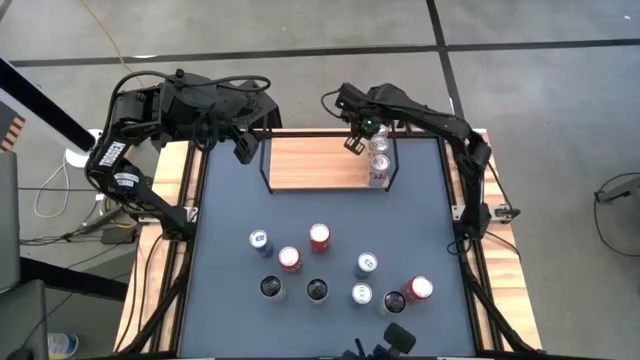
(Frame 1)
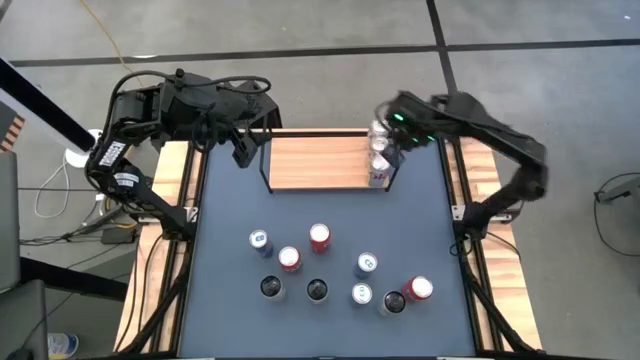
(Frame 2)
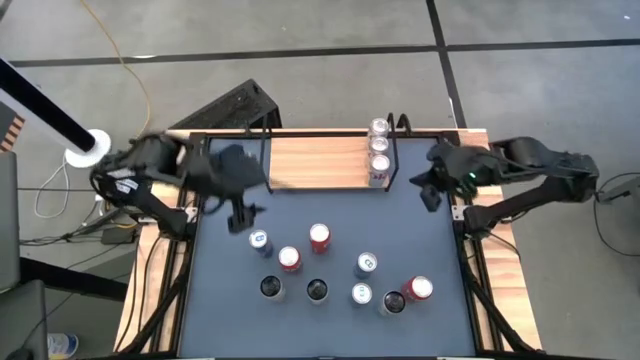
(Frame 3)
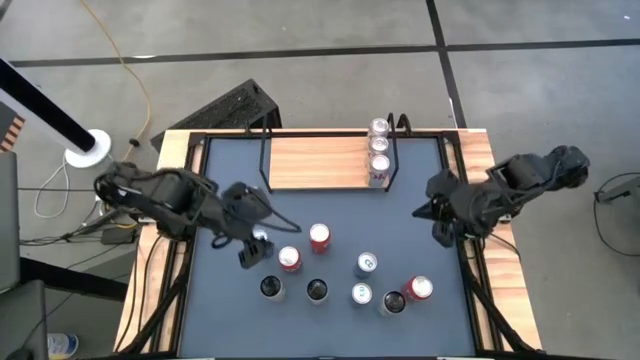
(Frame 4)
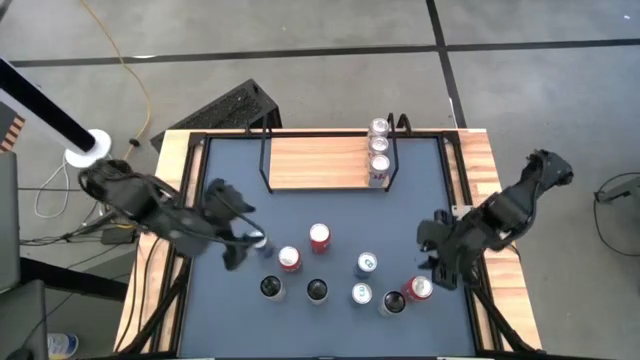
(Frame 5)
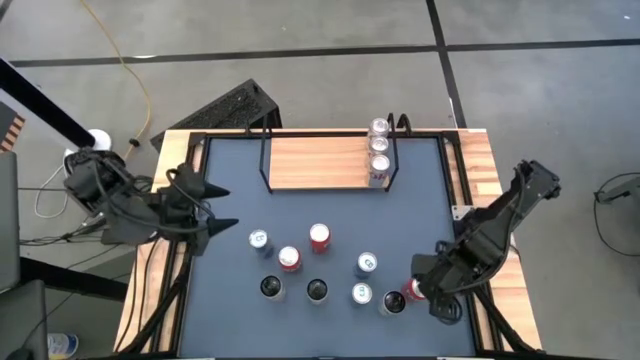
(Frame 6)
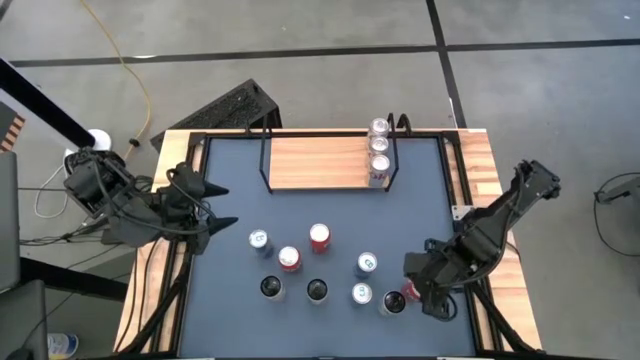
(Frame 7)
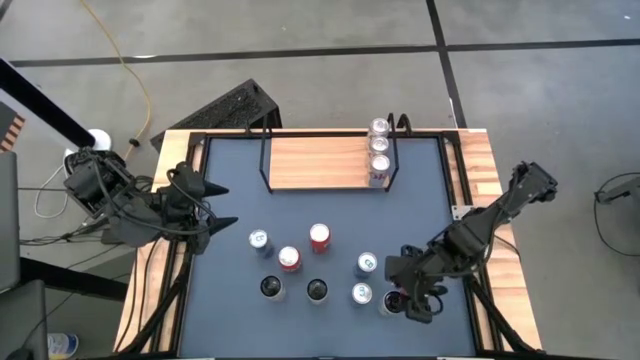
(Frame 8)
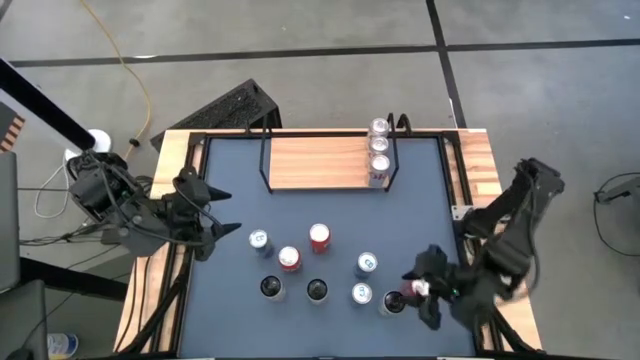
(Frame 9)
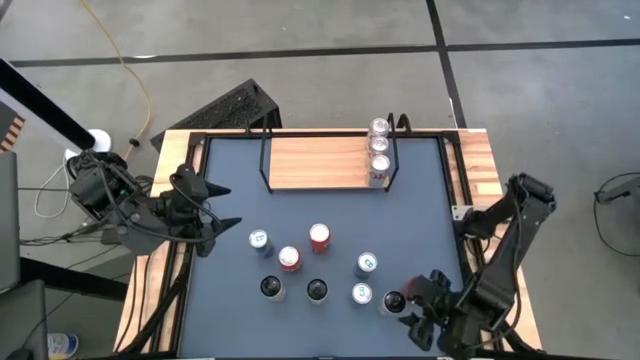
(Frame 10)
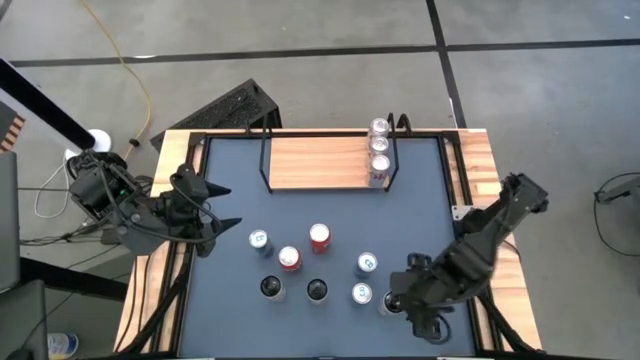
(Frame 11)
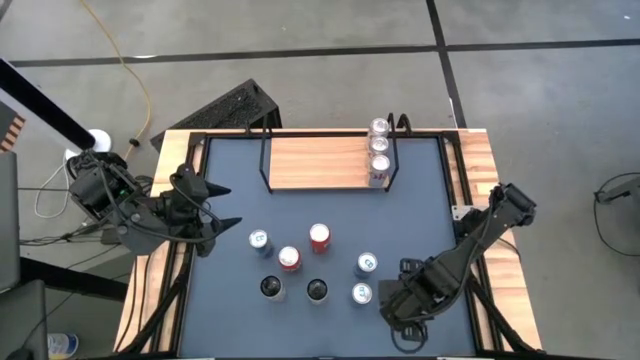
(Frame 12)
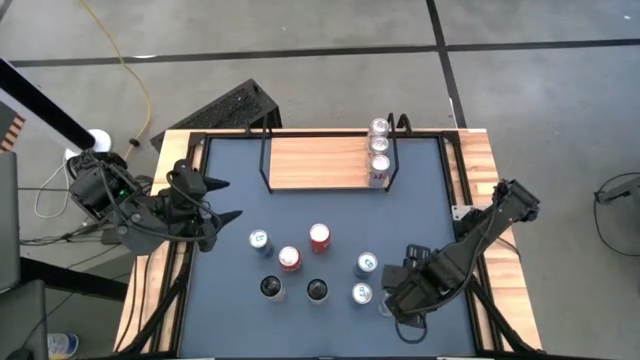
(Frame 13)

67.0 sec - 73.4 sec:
Task: Place canned beverage on shelf
Put the bottom right white soda can on the shelf

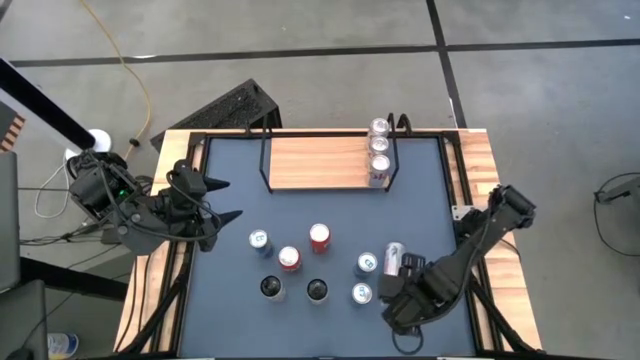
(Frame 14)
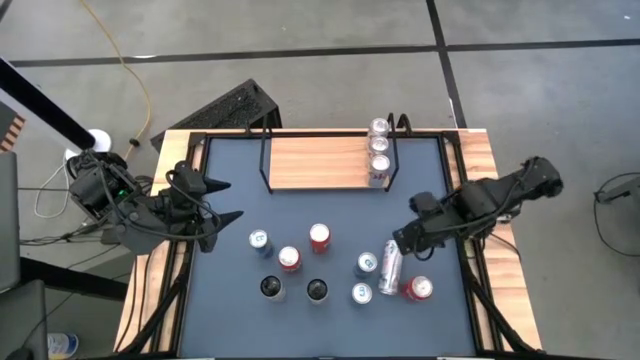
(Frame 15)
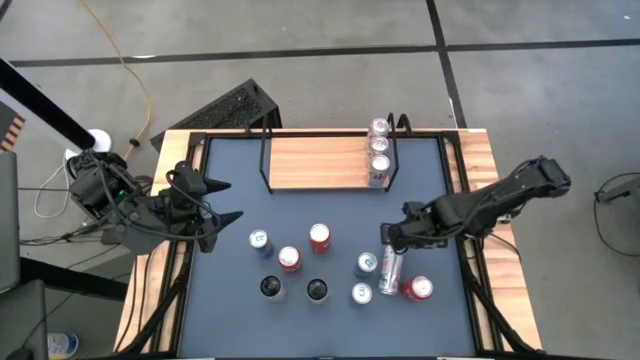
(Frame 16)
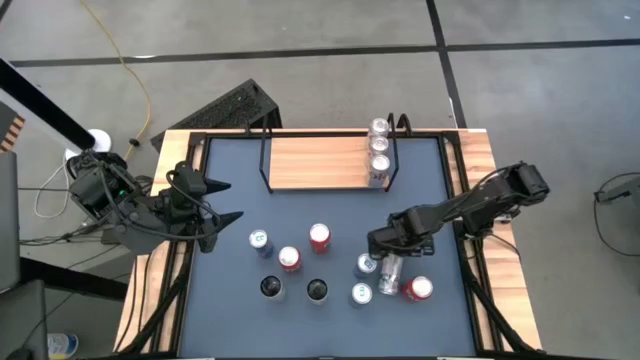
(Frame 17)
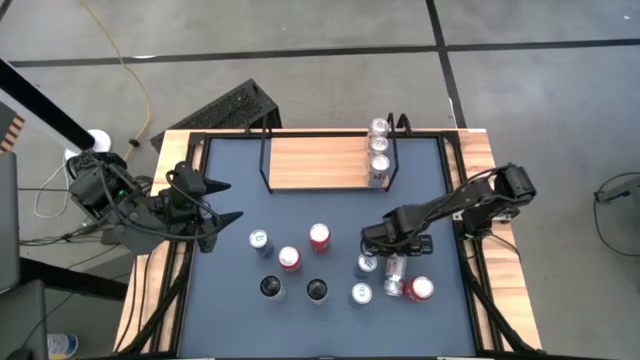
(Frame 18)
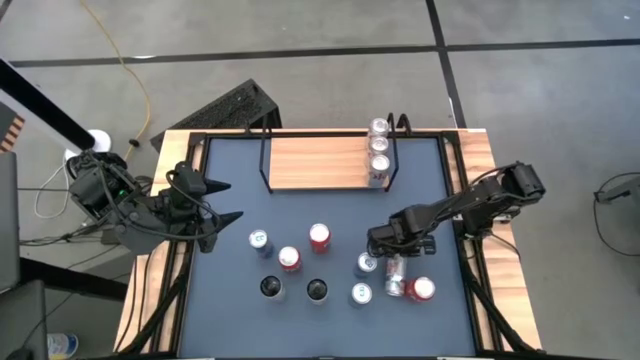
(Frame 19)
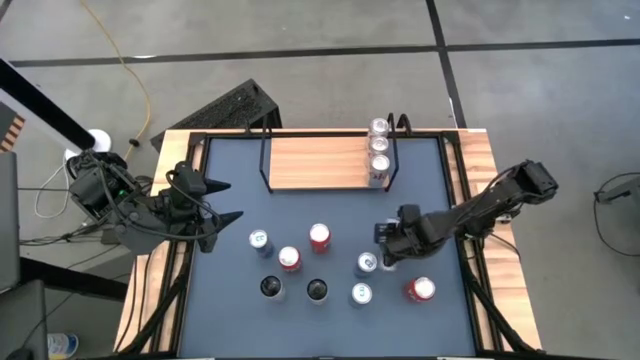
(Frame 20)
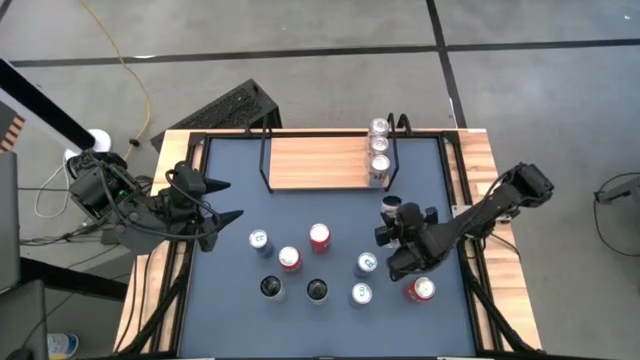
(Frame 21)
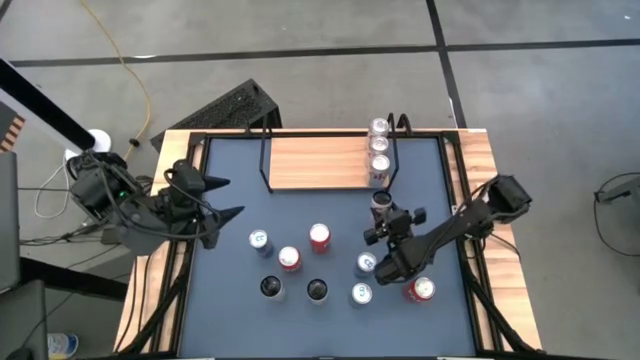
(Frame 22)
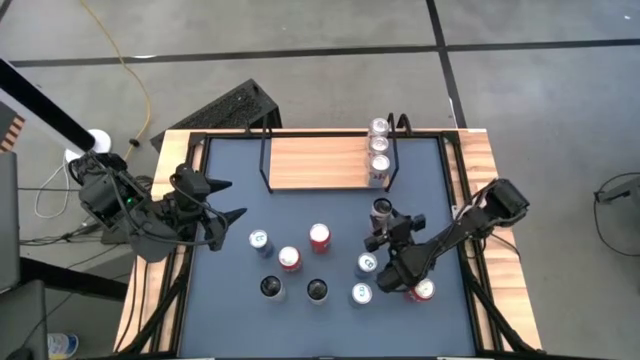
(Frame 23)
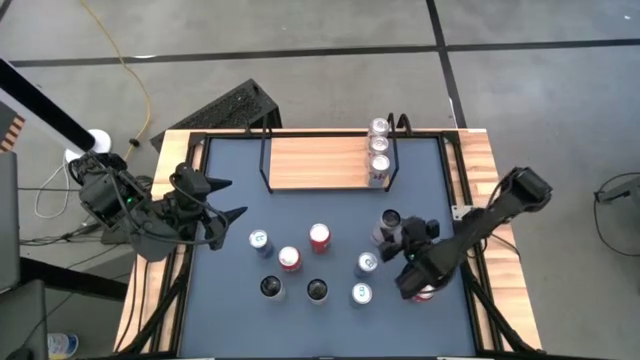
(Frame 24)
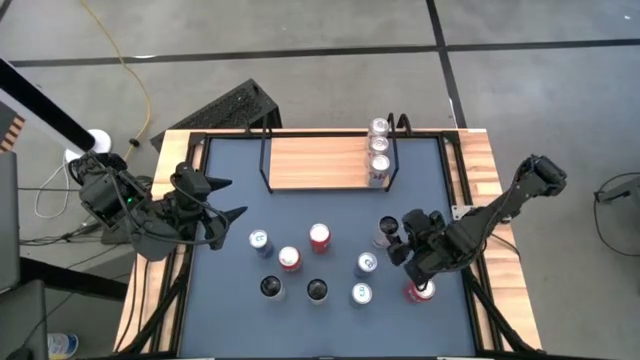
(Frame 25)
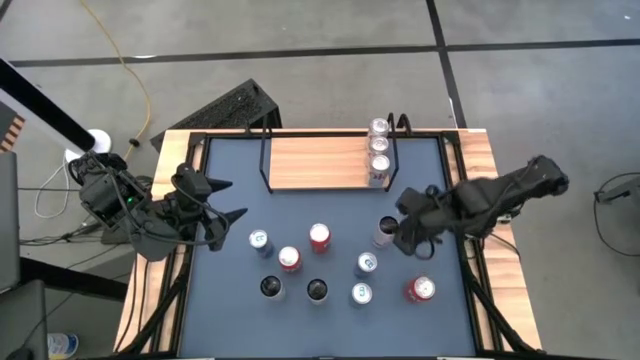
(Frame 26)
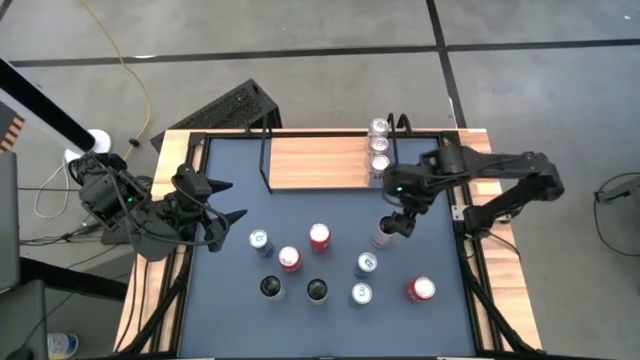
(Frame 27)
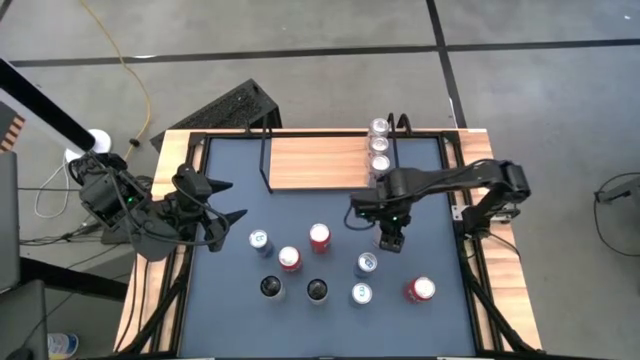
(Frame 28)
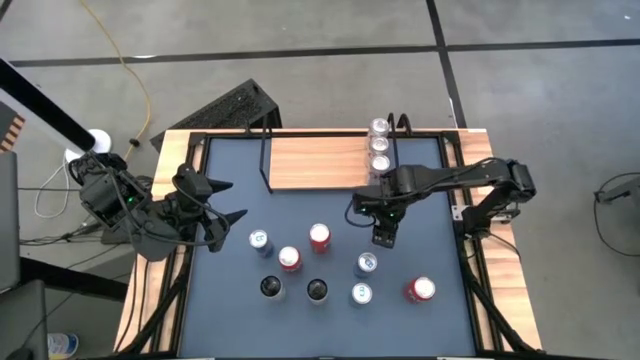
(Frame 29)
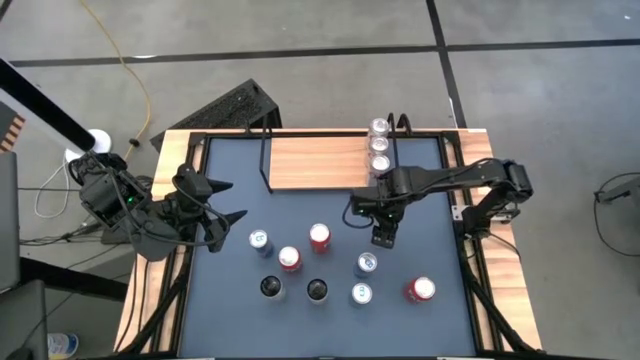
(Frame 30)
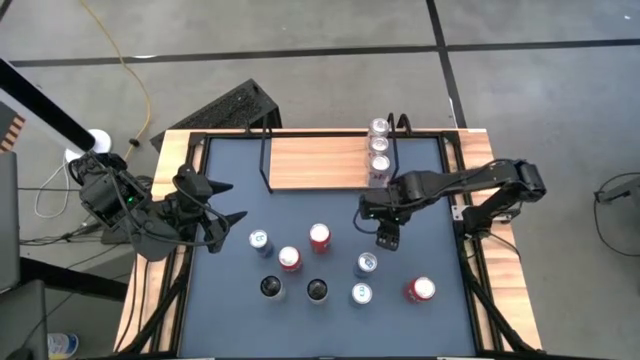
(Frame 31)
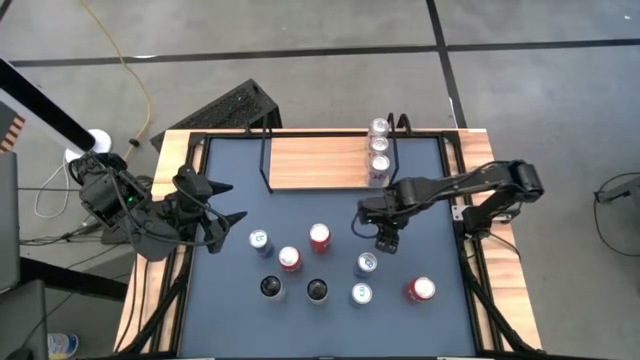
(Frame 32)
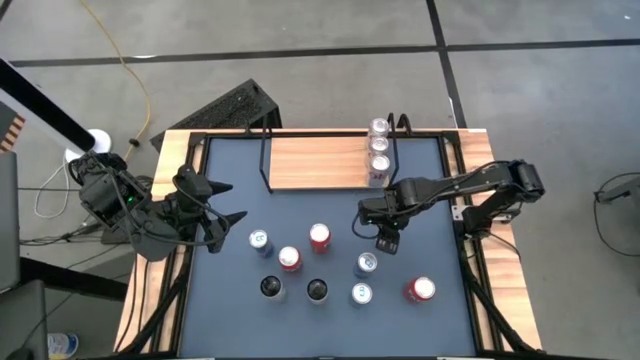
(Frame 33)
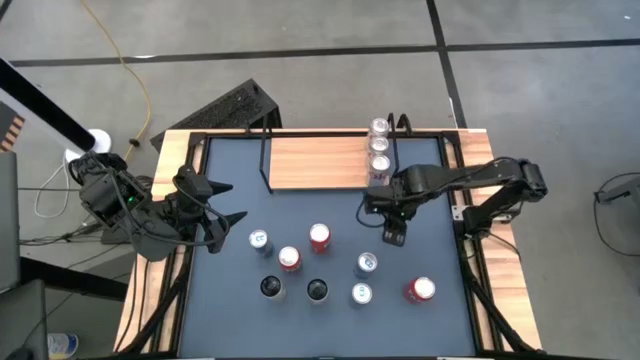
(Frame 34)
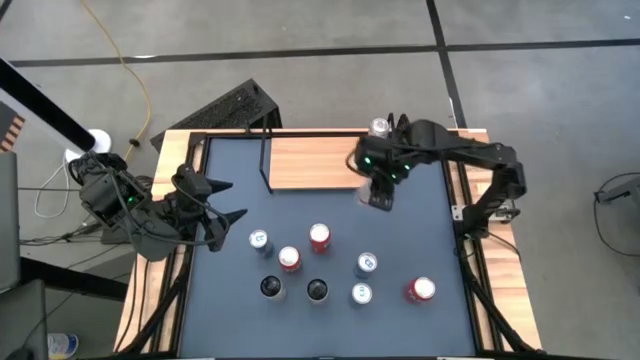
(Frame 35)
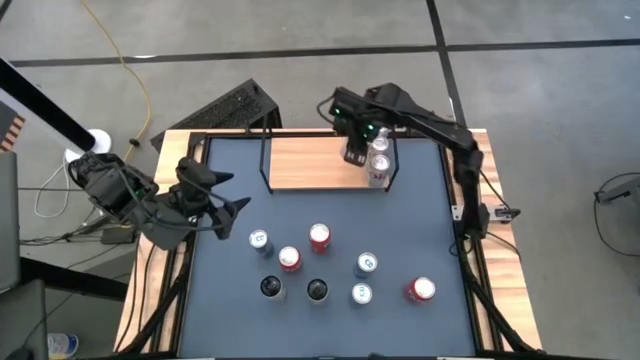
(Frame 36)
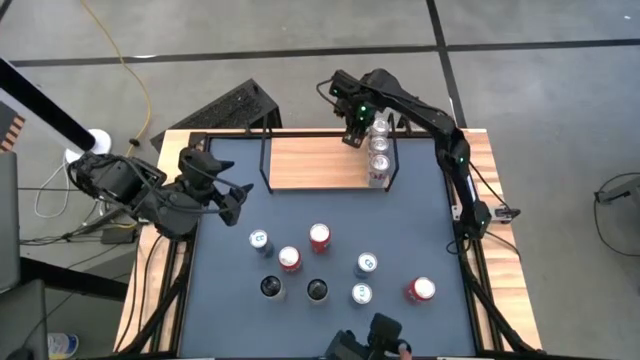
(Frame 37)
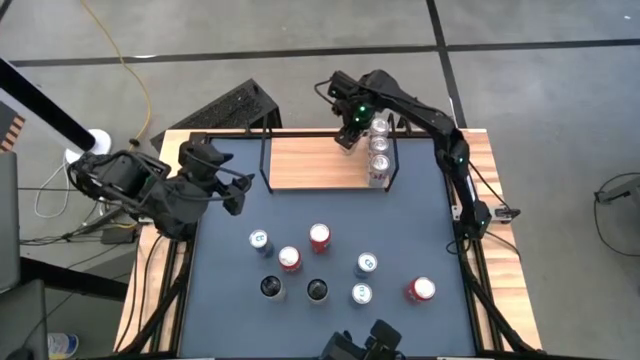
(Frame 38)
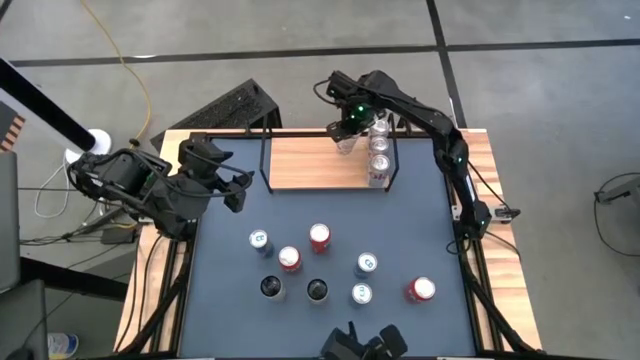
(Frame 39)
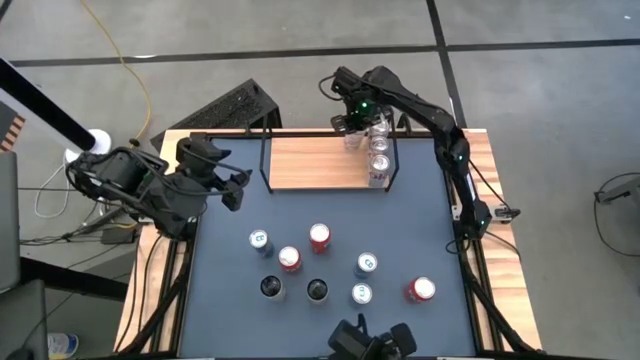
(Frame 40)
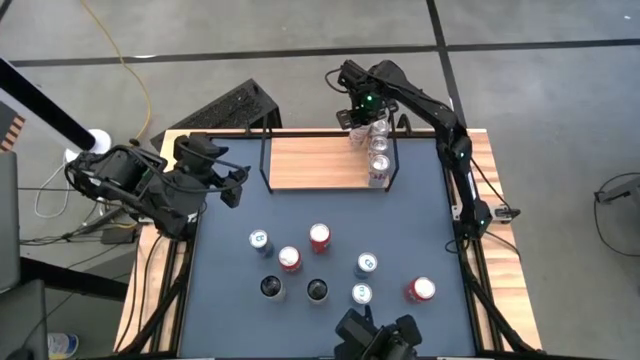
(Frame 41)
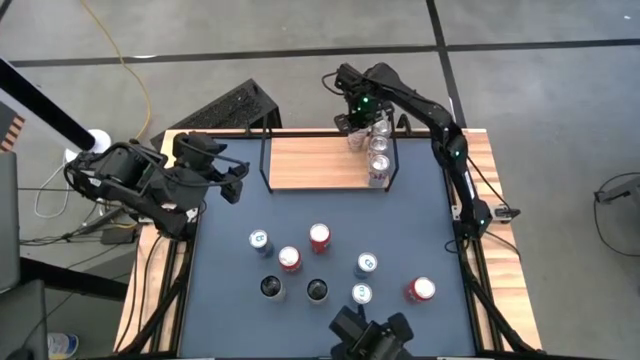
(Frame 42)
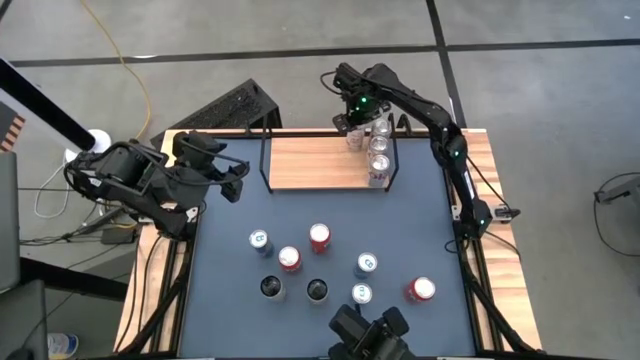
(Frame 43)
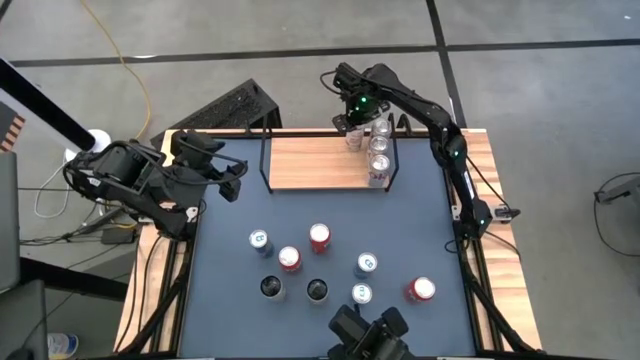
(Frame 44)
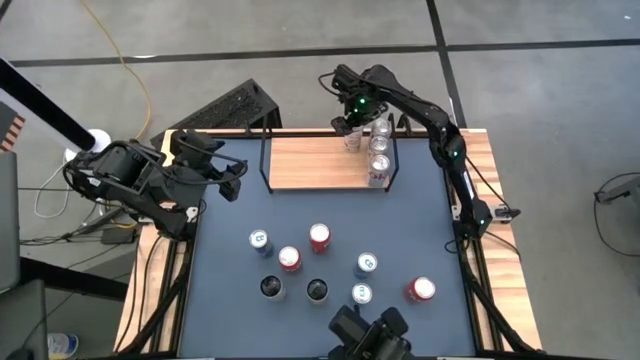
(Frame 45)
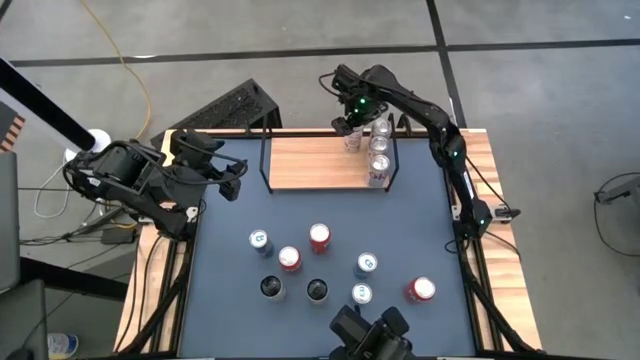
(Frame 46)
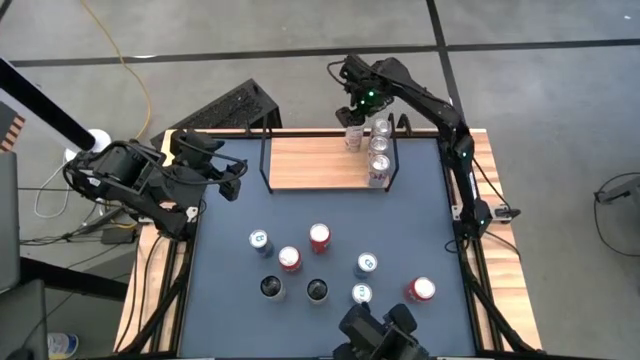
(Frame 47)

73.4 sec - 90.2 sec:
Put the bottom right white soda can on the shelf
